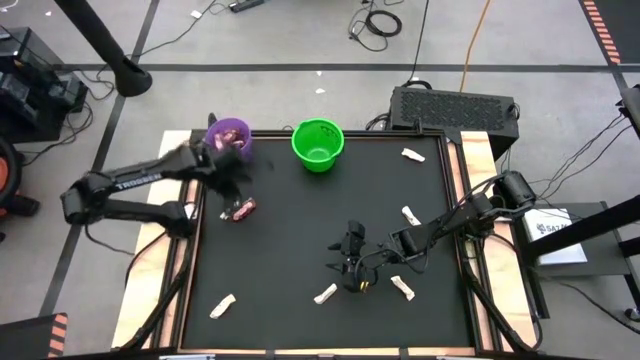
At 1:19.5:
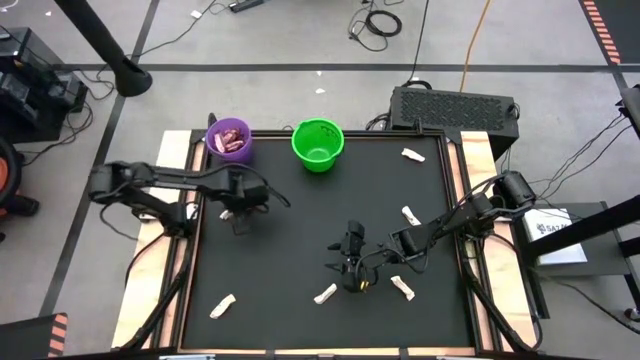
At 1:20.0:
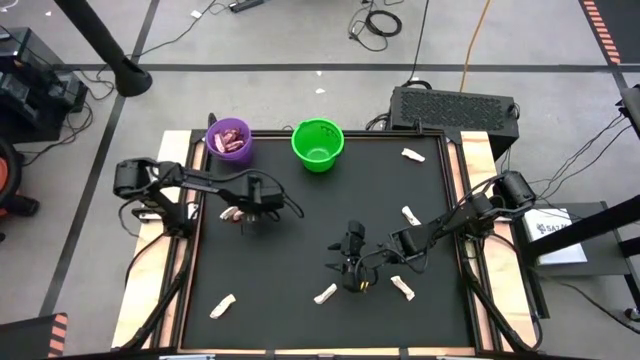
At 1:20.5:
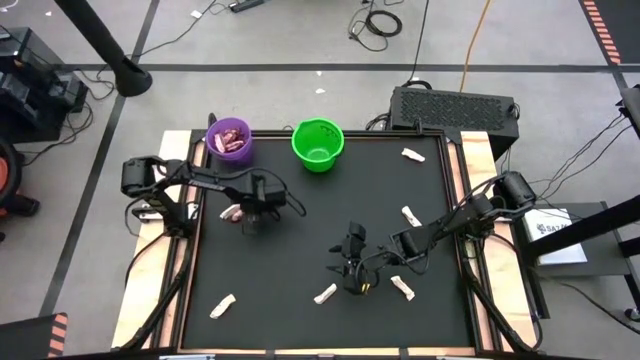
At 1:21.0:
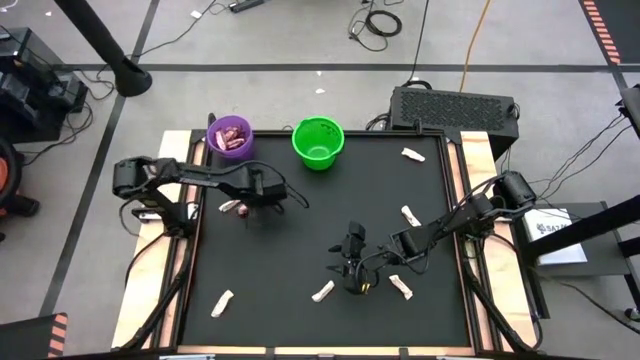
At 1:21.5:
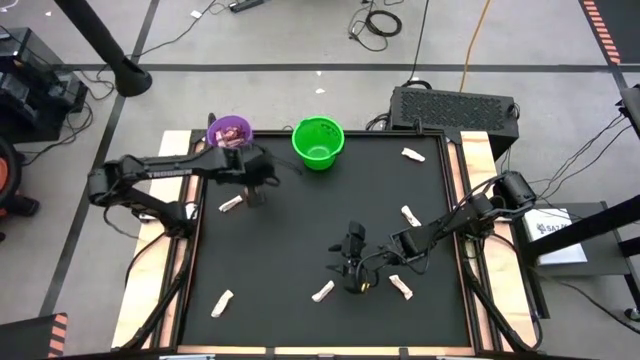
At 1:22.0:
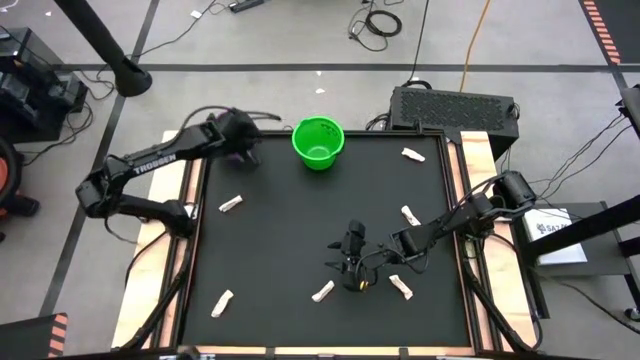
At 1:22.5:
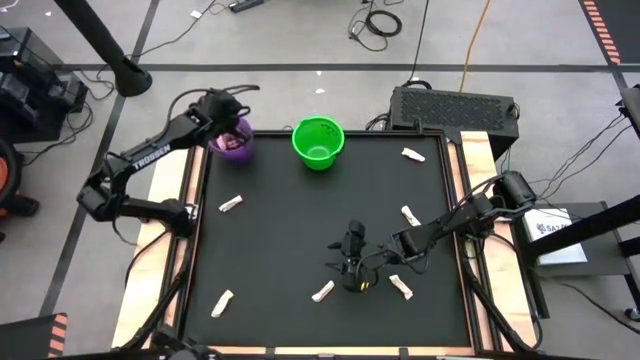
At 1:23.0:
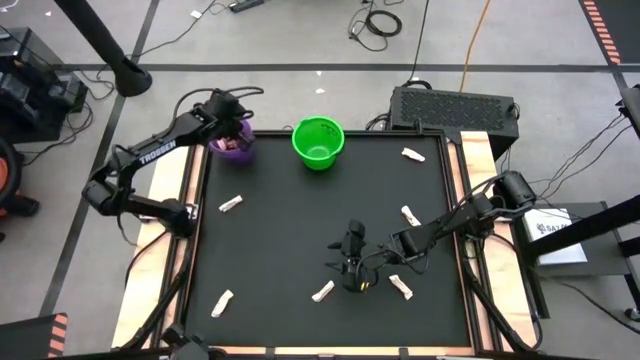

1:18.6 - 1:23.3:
Task: Sort candy by brand, put in halloween buckets
Put the brown chocolate bar into the purple bucket

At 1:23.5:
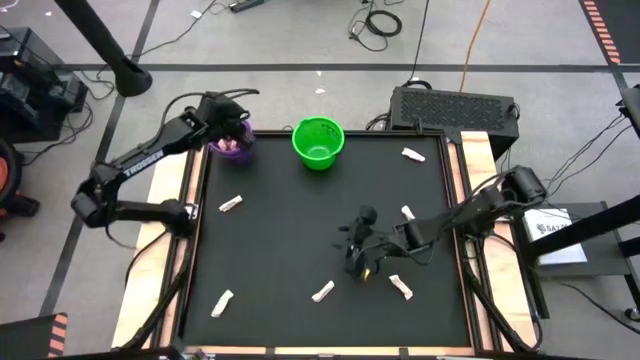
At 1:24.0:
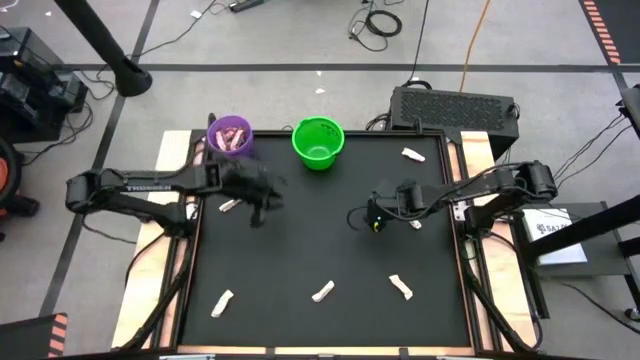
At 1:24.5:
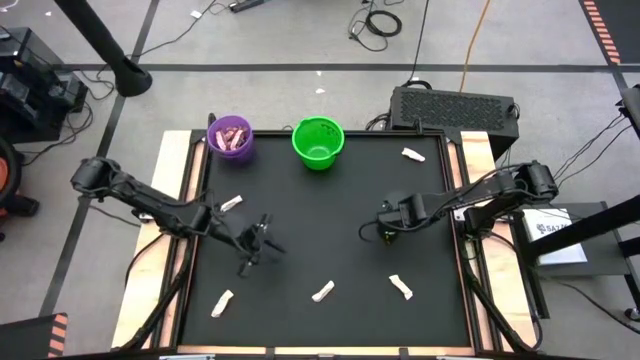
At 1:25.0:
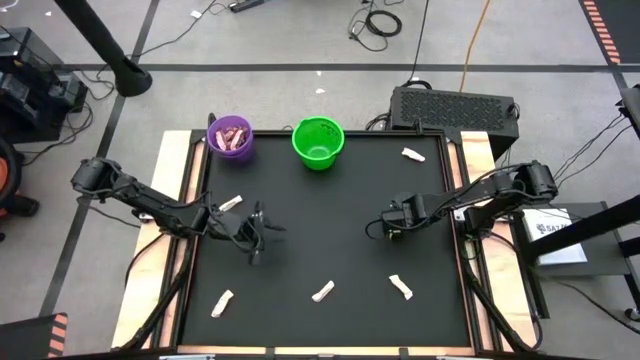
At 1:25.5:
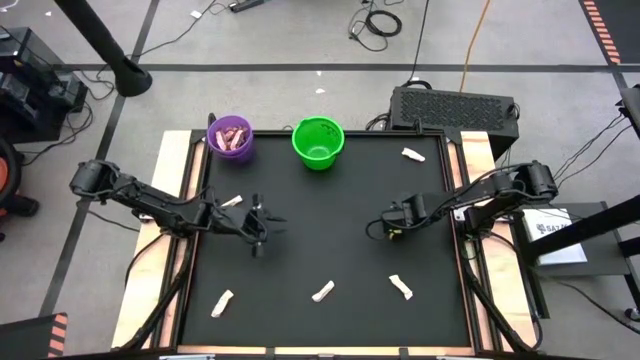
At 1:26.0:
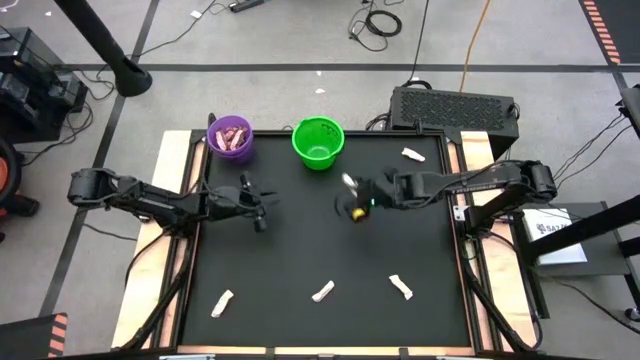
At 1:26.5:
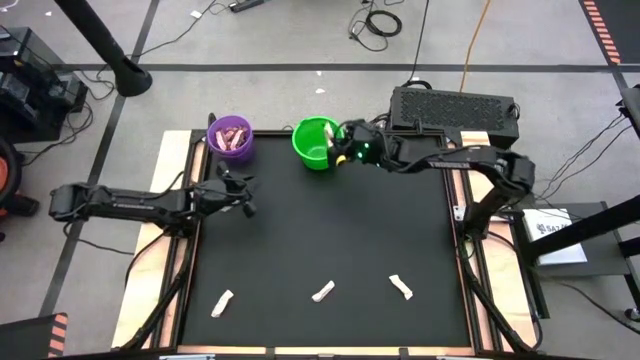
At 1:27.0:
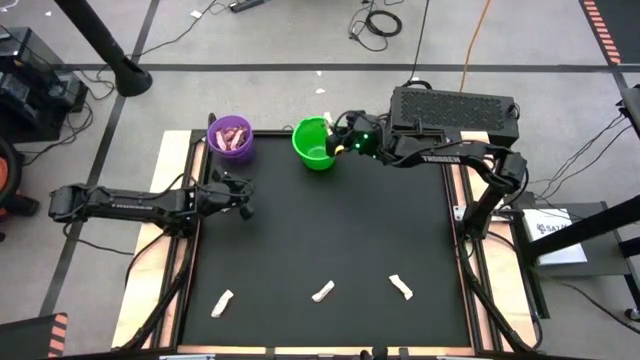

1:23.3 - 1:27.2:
Put the white chocolate bar into the green bucket

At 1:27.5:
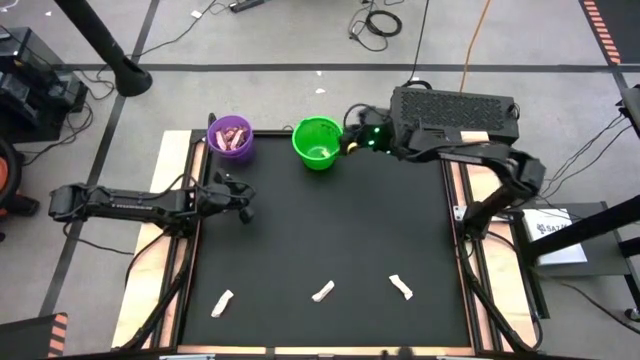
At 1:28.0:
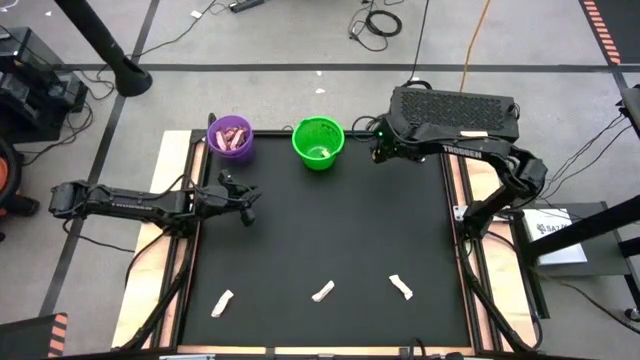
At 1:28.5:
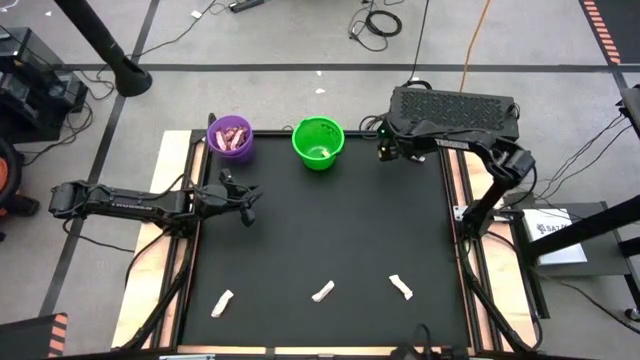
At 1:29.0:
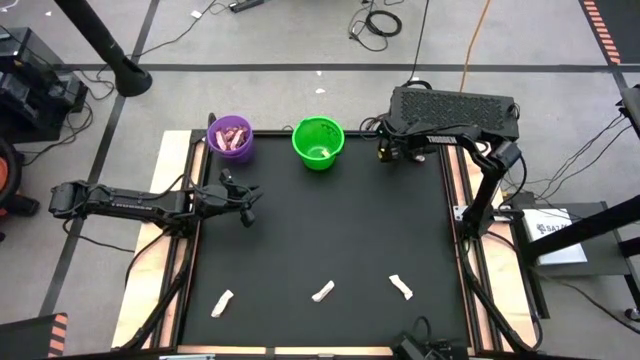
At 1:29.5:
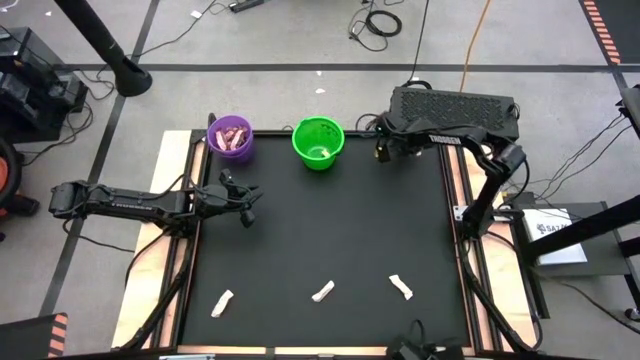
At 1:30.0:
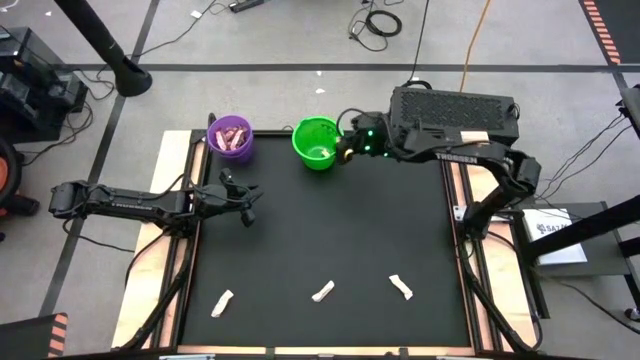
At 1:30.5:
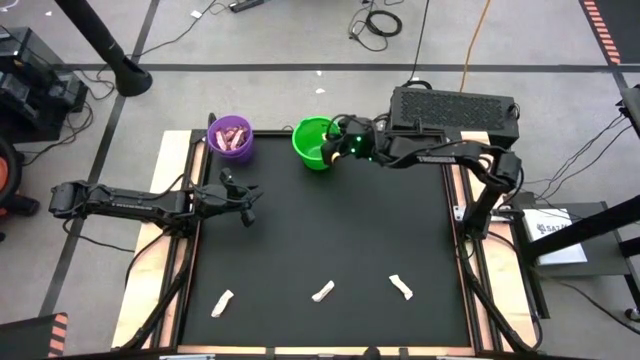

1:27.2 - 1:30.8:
Put the white chocolate bar into the green bucket

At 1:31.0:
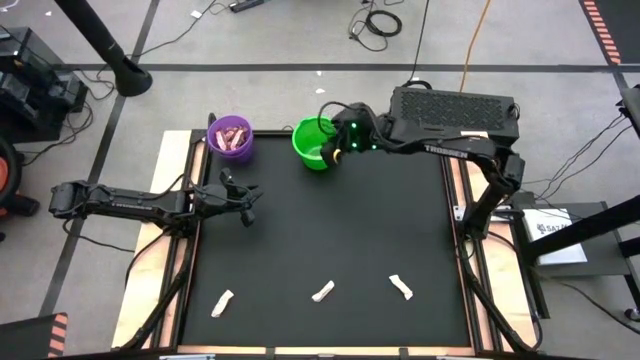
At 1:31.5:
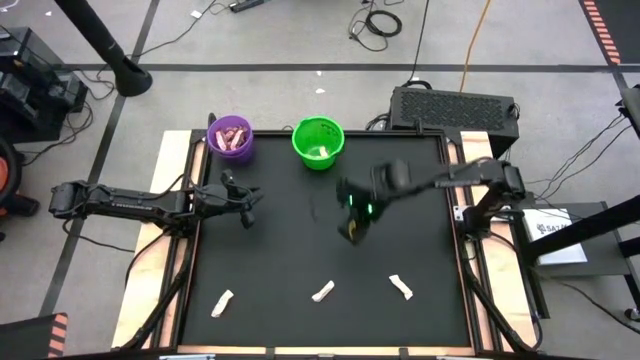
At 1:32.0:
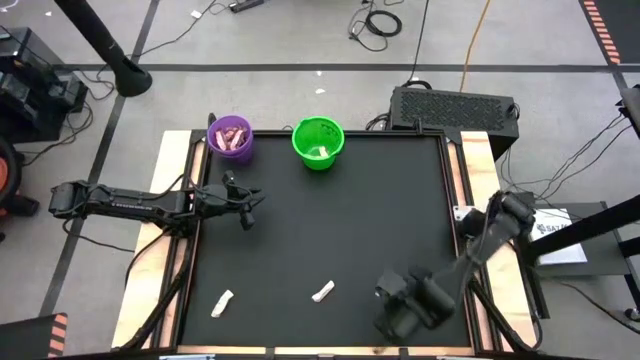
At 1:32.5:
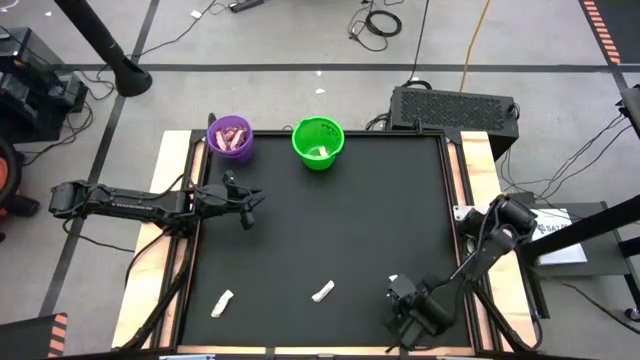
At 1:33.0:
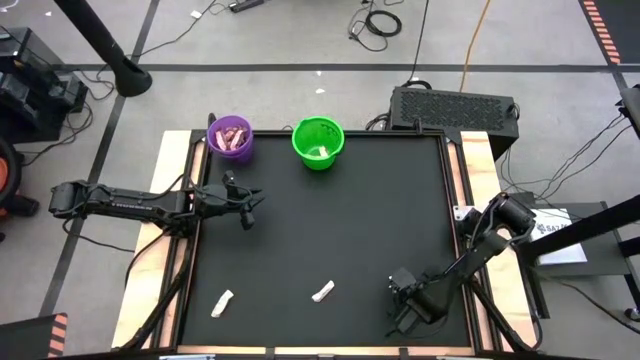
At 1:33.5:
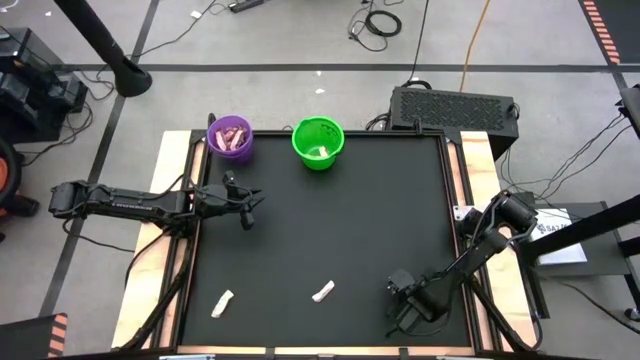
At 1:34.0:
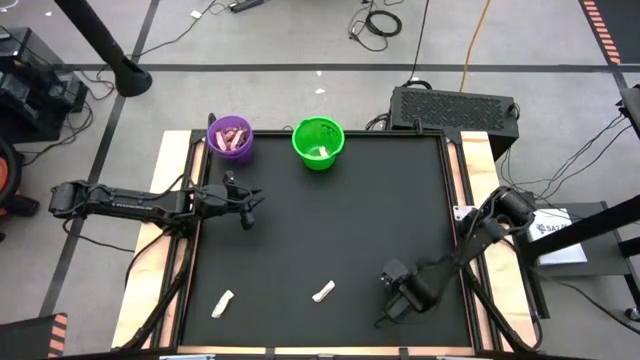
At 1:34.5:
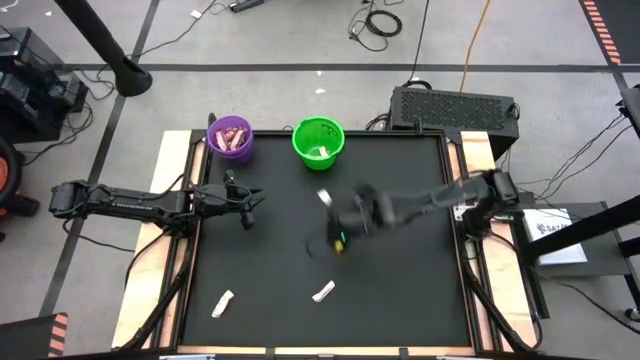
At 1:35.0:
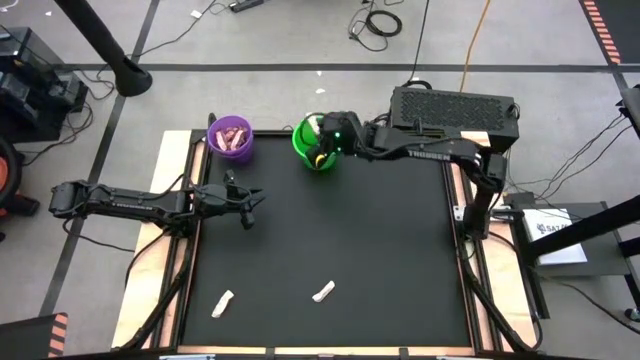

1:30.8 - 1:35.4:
Put the white chocolate bar into the green bucket

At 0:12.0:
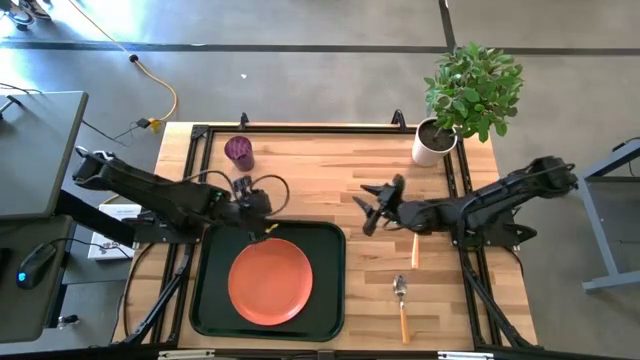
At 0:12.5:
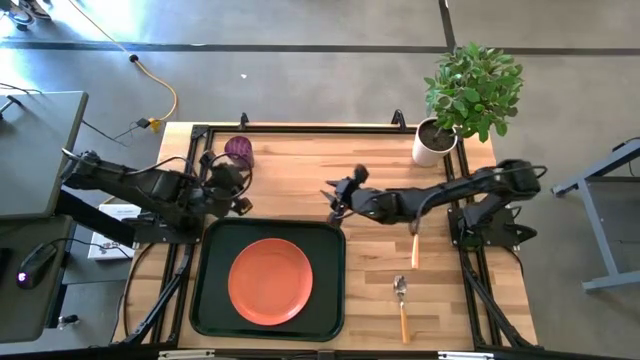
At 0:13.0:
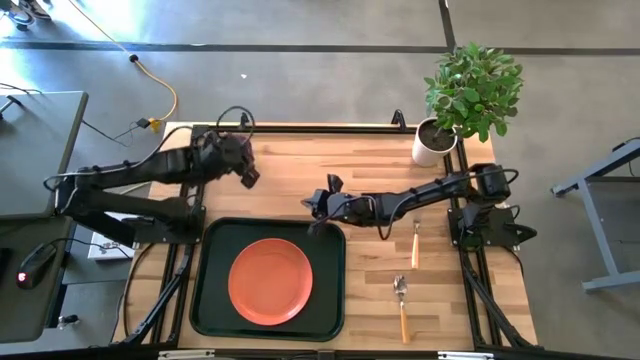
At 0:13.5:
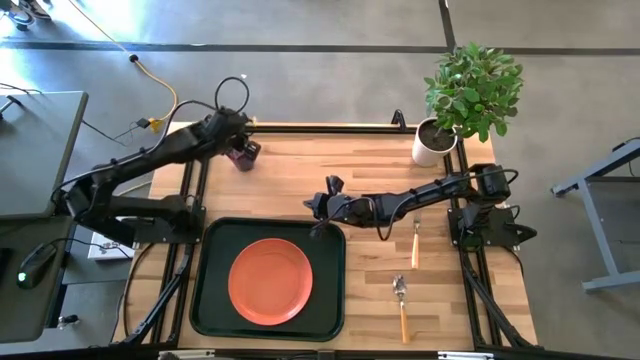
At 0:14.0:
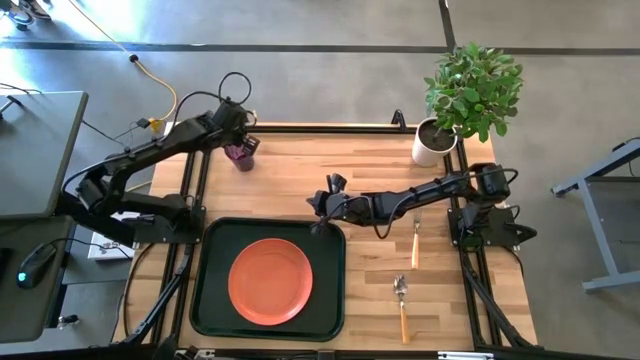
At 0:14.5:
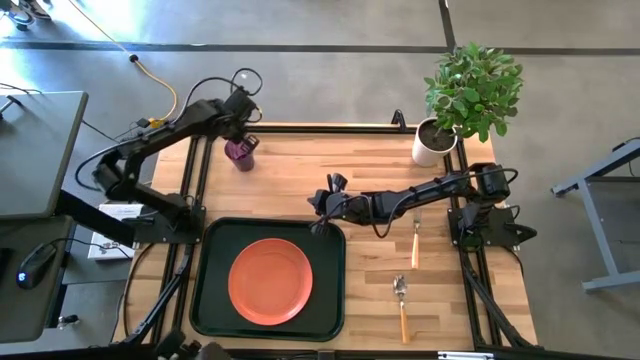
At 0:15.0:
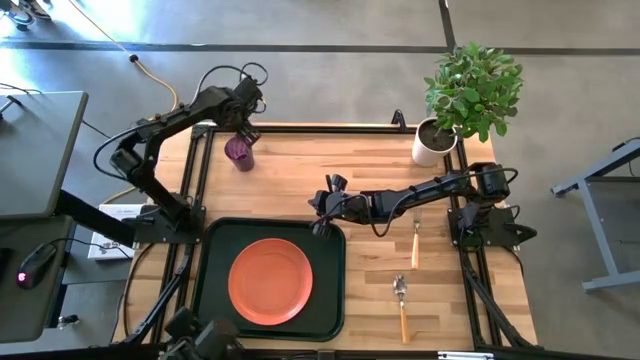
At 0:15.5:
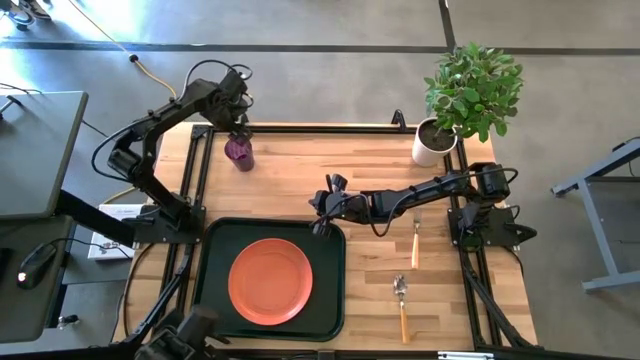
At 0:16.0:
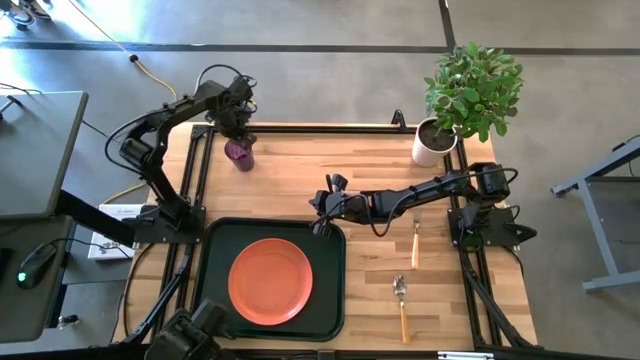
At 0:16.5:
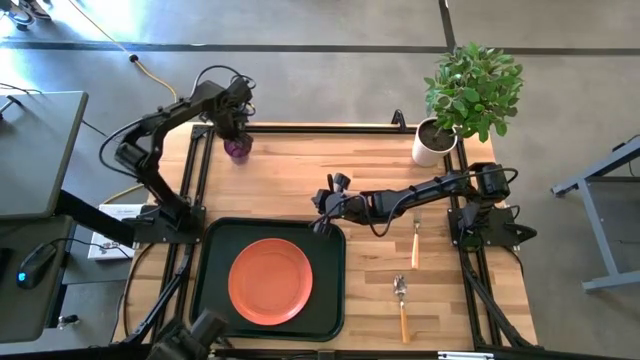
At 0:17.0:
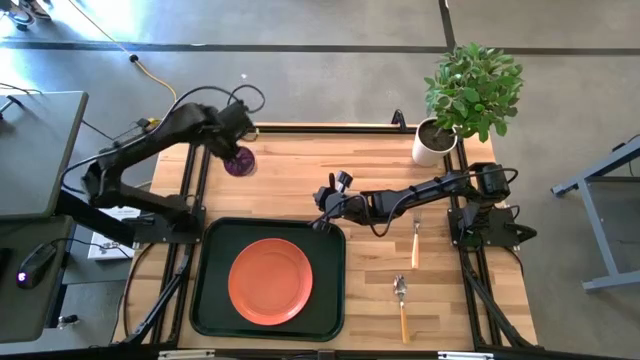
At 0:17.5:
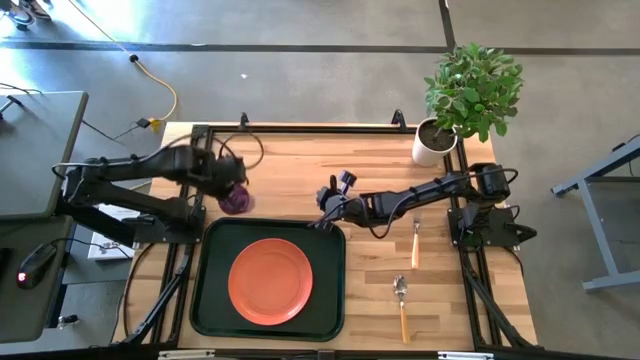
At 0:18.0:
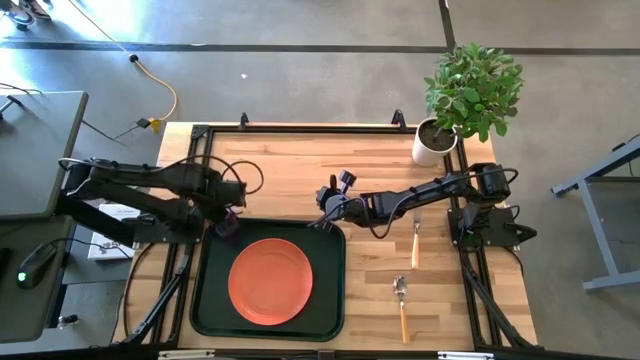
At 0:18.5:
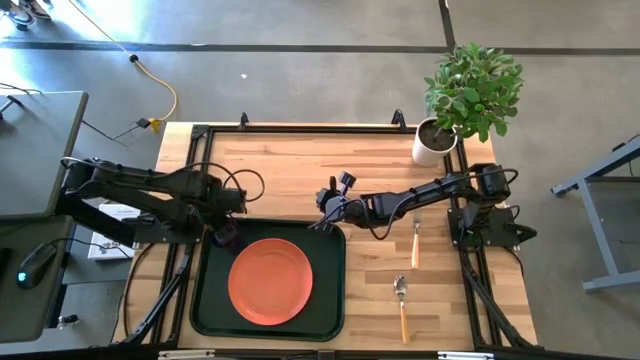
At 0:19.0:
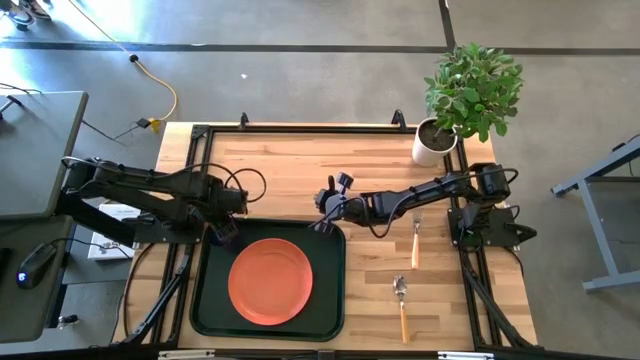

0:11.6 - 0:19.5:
Task: Pick and place plate/cup/fork/spoon on tray
Put the violet glass on the black serving tray to the top left of the orange plate
